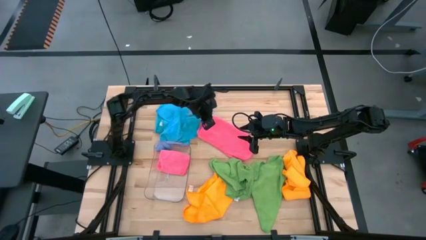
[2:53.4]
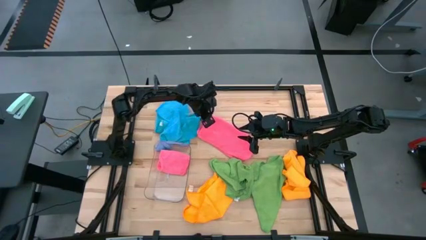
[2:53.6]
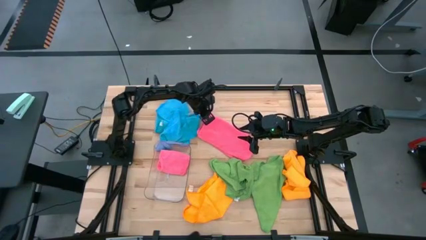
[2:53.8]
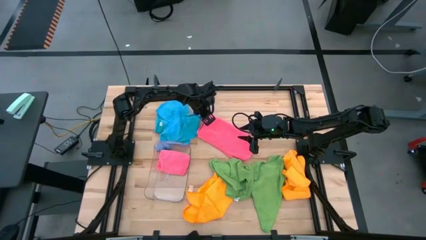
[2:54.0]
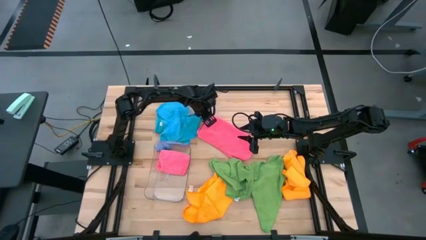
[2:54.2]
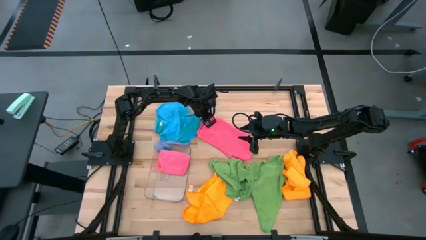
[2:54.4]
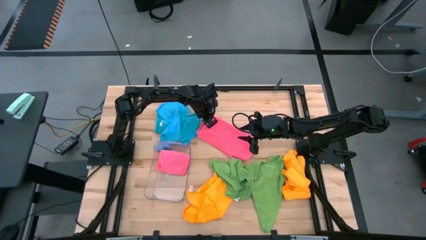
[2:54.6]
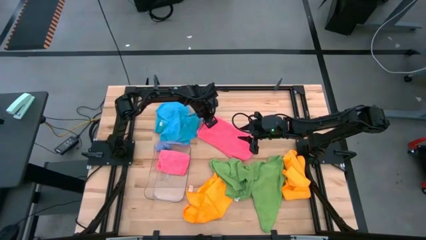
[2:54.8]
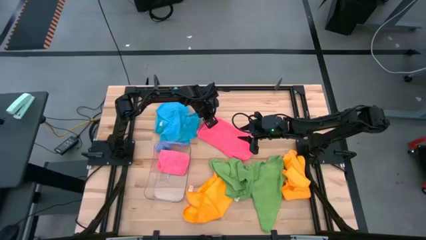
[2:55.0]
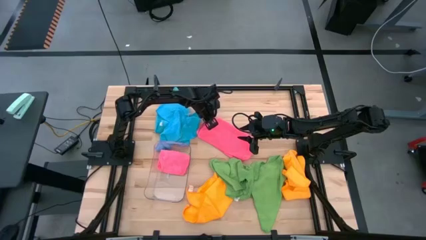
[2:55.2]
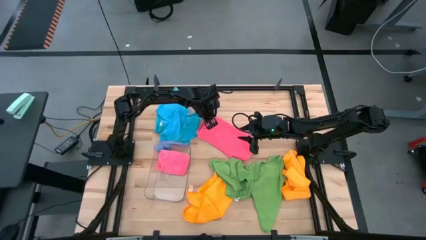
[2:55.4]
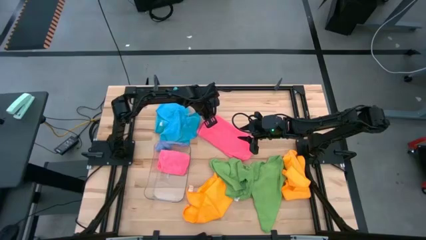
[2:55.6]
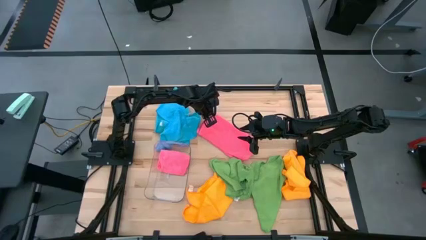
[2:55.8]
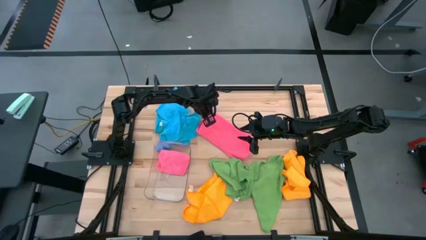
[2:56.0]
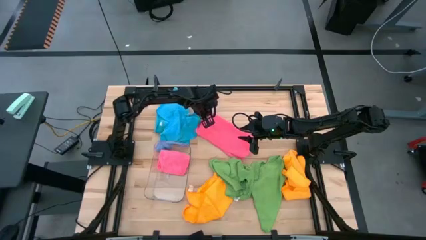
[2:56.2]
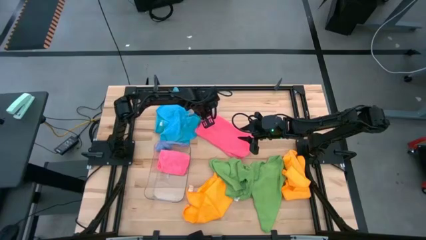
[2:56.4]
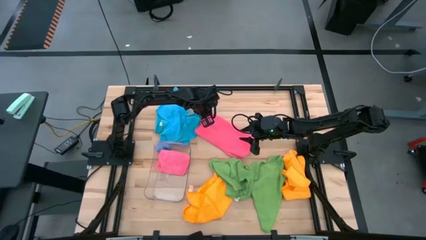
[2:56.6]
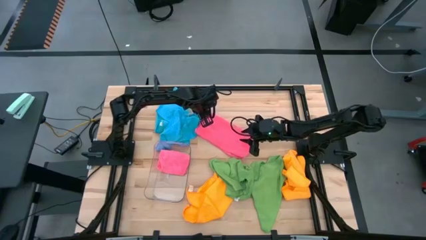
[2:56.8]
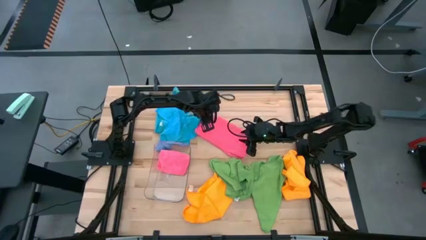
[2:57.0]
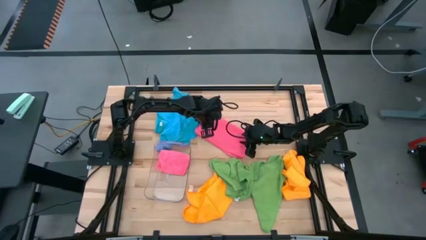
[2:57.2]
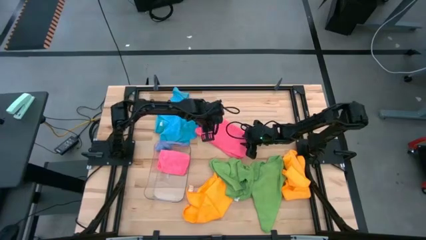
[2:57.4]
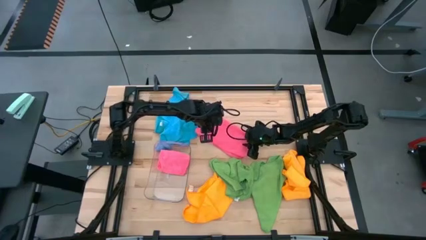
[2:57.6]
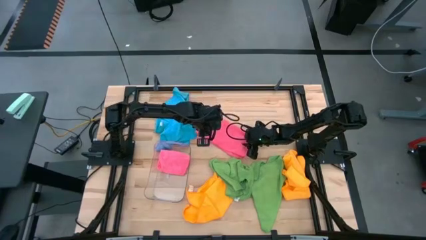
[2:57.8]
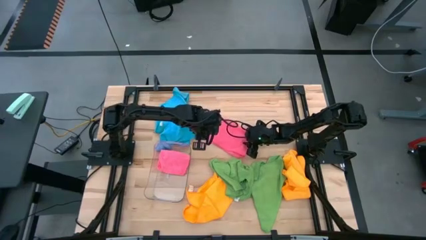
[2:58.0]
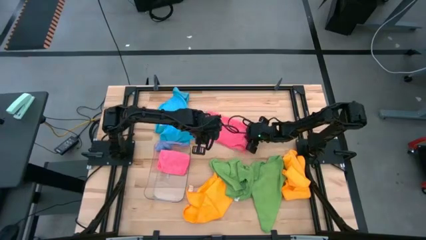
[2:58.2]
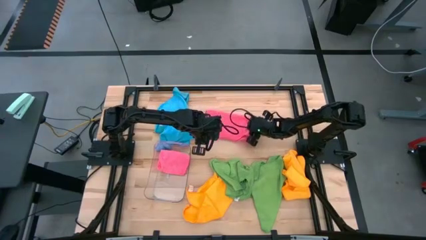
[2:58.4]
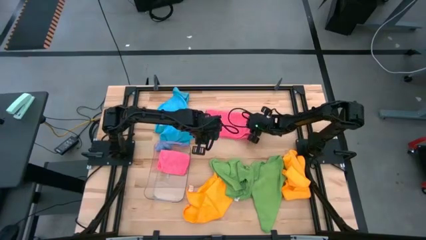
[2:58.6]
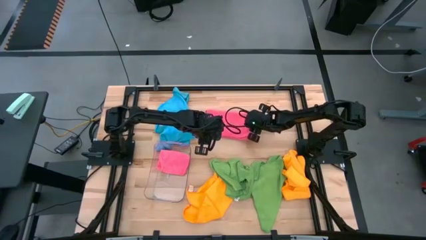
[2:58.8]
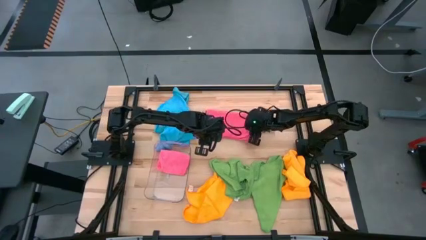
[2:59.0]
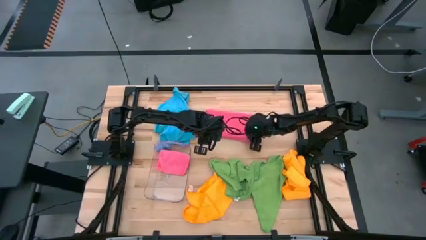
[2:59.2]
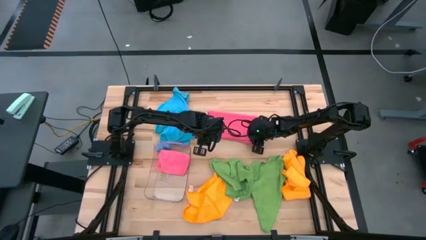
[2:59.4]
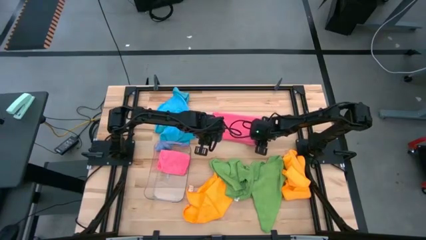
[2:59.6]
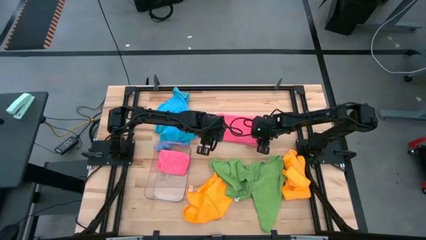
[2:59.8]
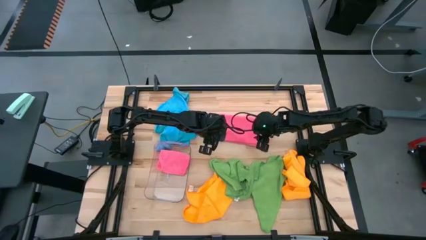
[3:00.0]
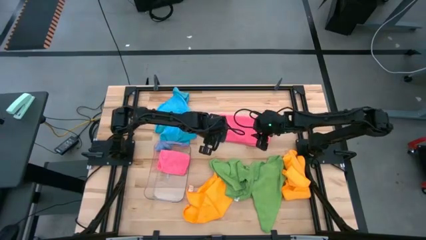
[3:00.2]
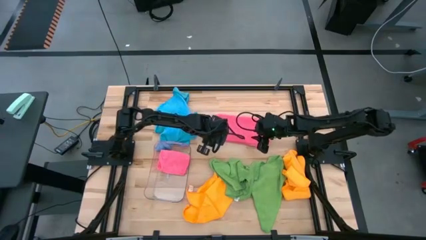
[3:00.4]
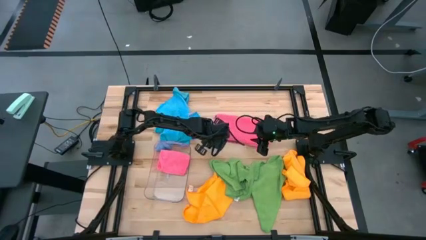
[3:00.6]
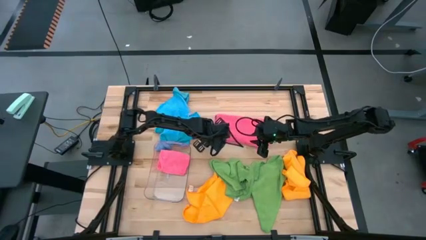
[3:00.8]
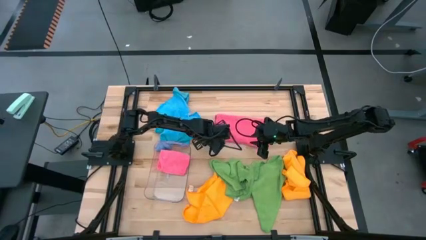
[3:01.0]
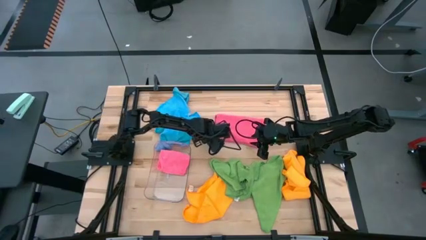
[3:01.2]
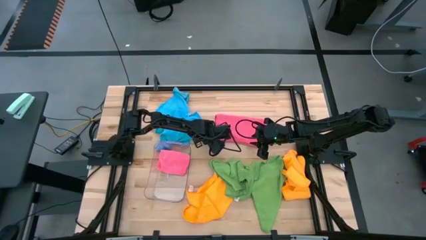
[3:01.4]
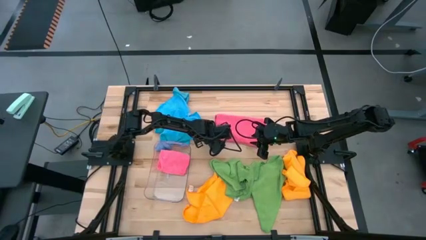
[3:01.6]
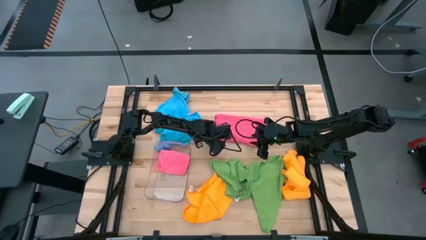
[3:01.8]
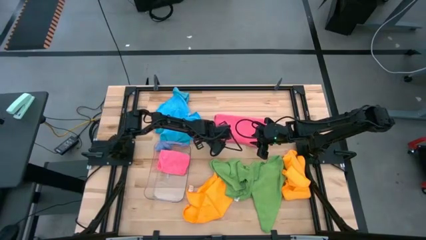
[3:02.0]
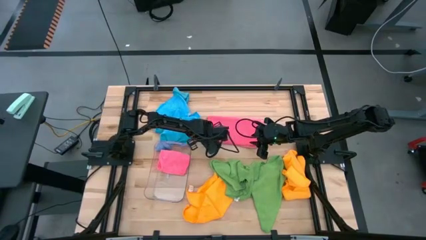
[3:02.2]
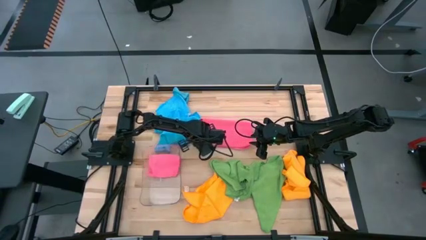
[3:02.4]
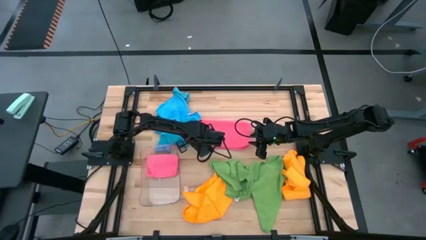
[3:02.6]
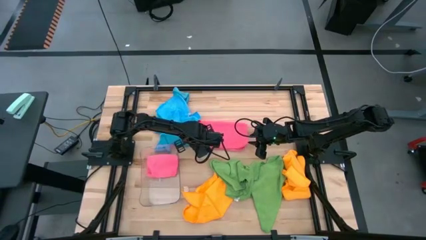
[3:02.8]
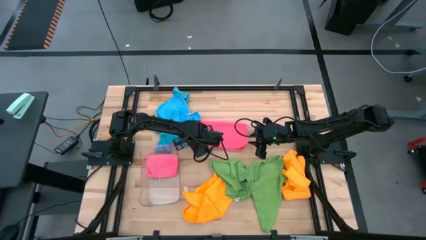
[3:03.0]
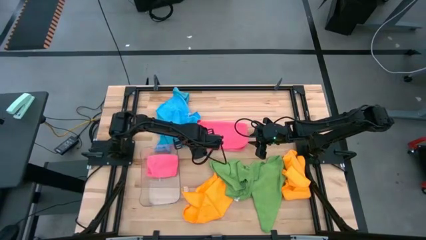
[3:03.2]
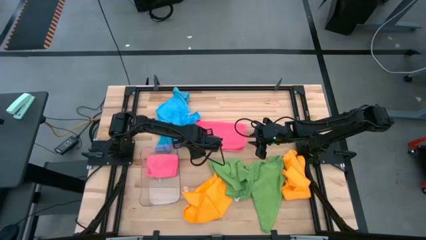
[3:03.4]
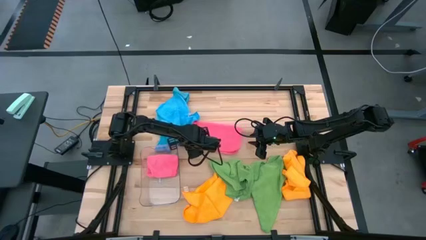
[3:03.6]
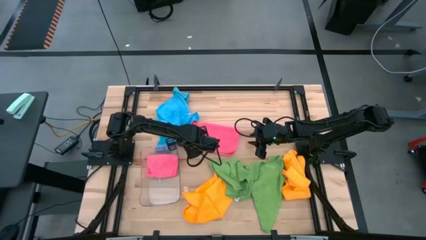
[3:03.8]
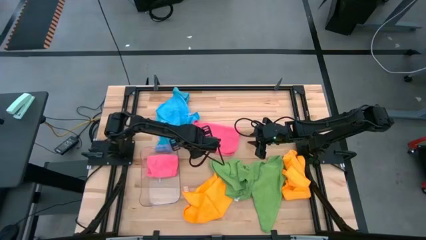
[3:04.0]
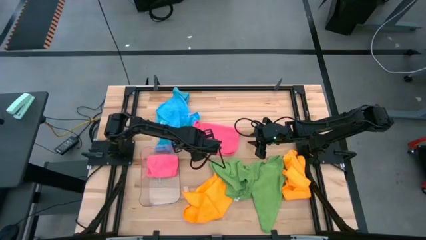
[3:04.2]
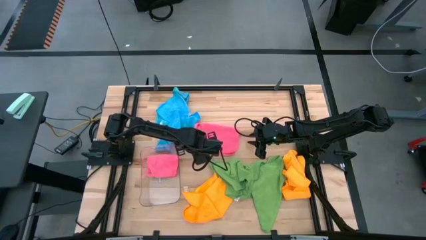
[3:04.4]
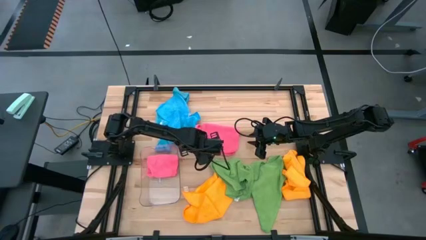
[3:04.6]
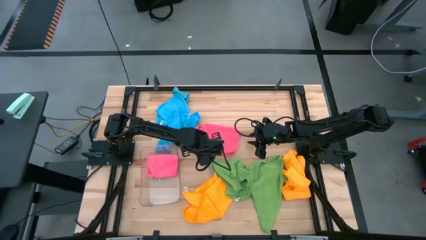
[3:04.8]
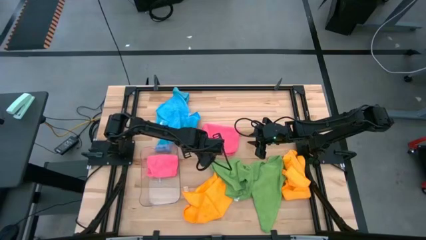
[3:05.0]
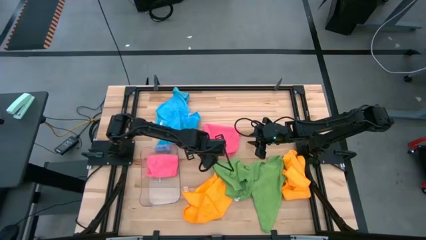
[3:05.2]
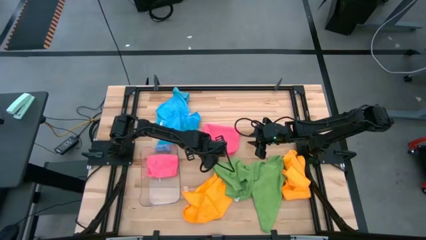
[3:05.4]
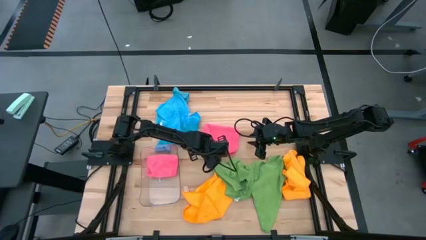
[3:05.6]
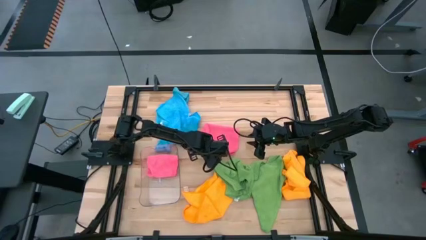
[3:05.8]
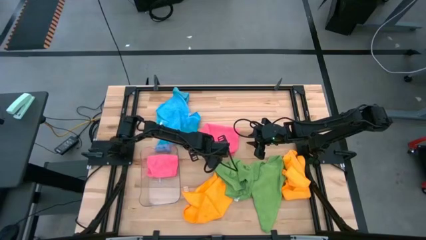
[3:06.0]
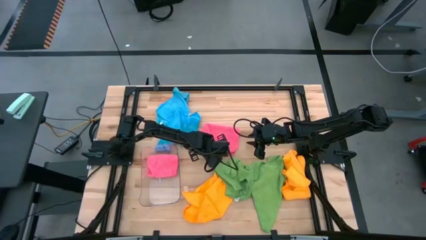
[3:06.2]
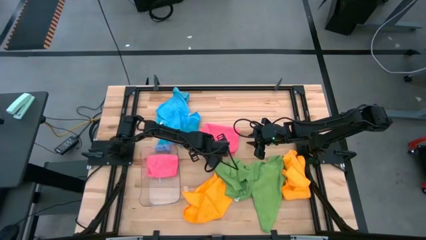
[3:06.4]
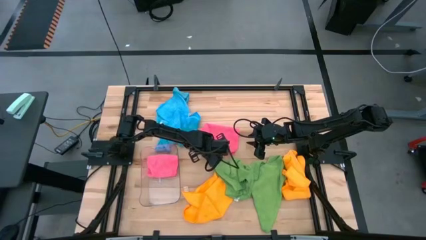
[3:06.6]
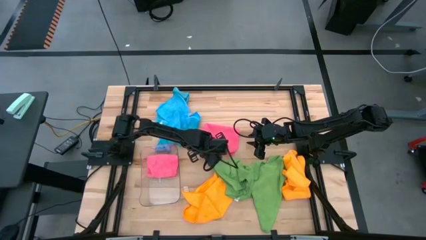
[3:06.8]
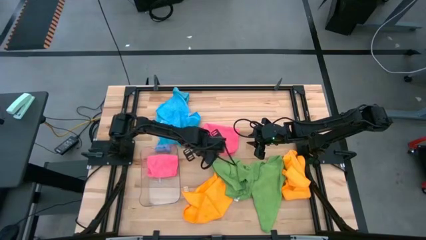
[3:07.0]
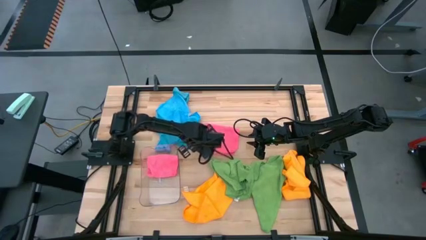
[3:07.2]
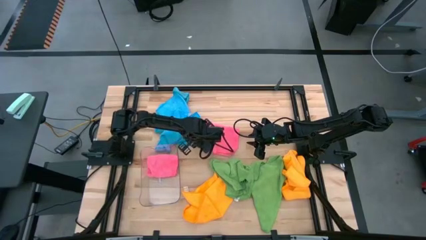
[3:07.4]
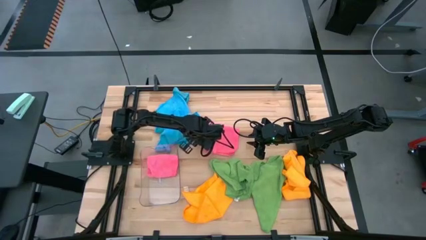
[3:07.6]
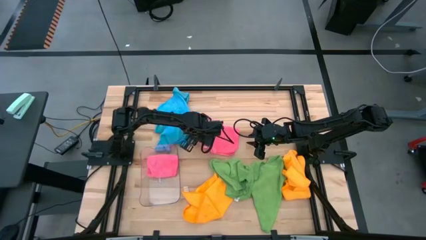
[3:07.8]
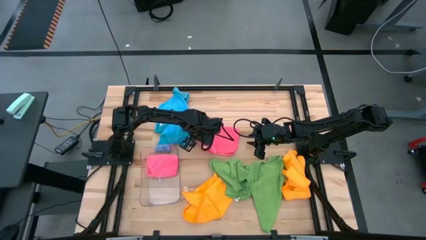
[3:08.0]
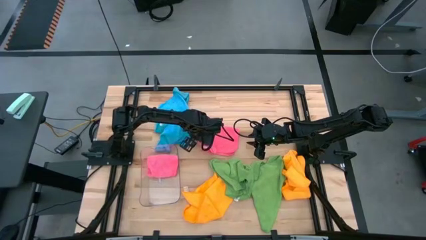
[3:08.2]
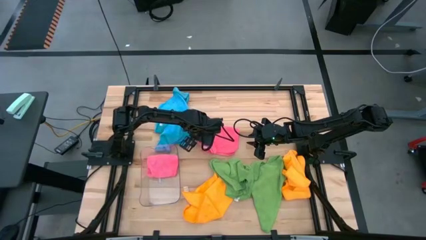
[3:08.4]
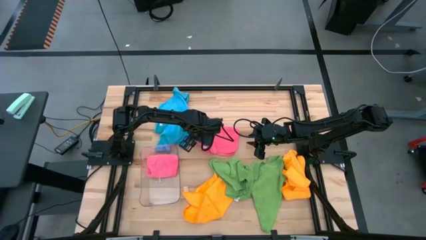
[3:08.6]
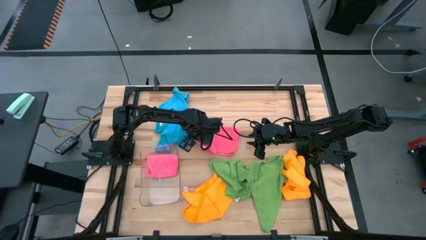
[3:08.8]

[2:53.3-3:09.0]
Task: Fold microfiber towels
Fold the pink microfiber cloth
